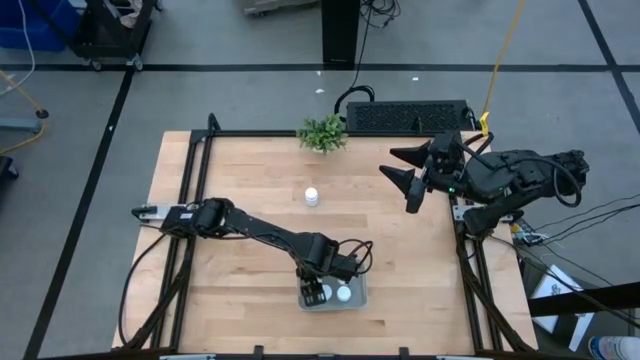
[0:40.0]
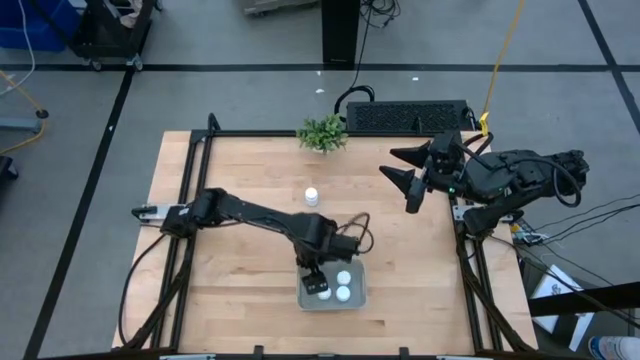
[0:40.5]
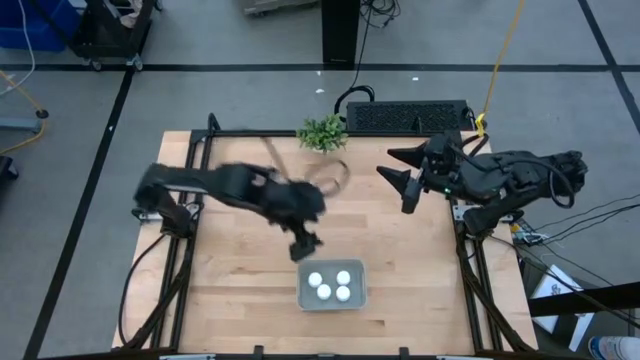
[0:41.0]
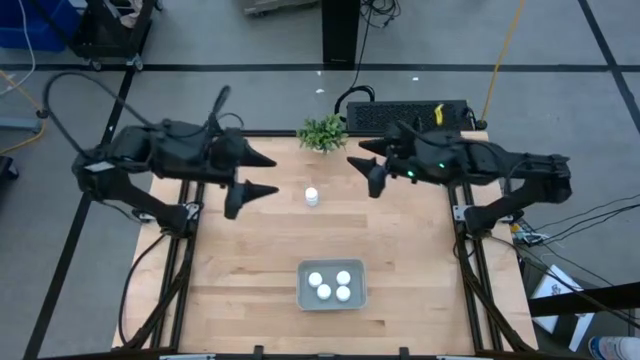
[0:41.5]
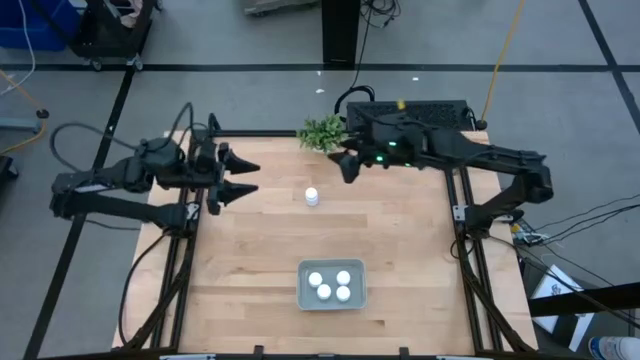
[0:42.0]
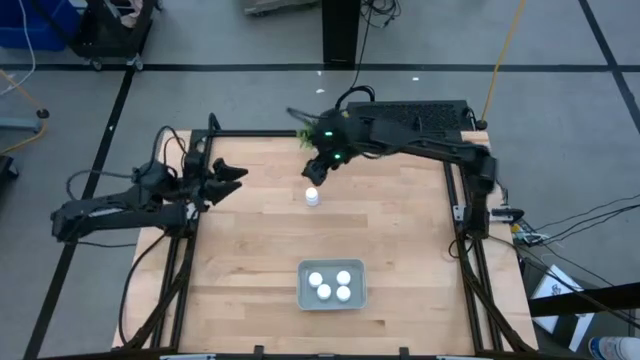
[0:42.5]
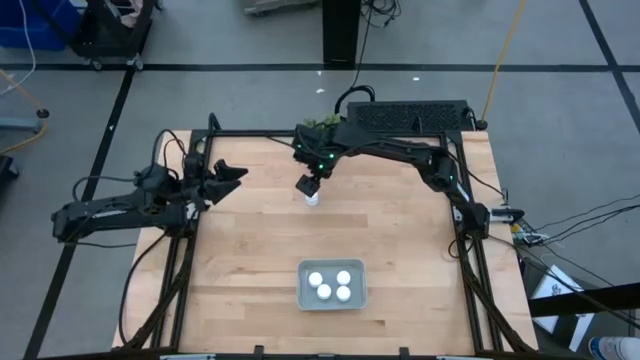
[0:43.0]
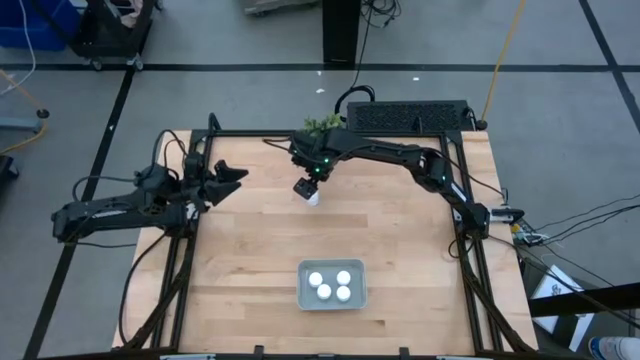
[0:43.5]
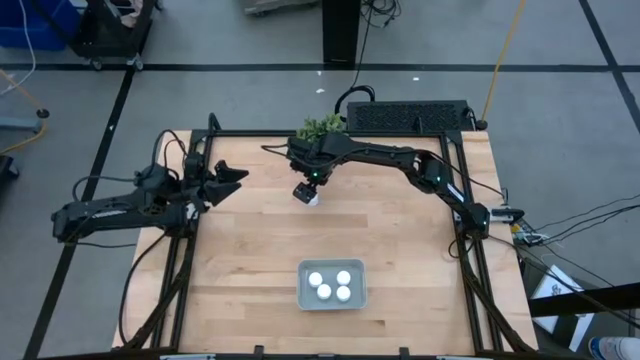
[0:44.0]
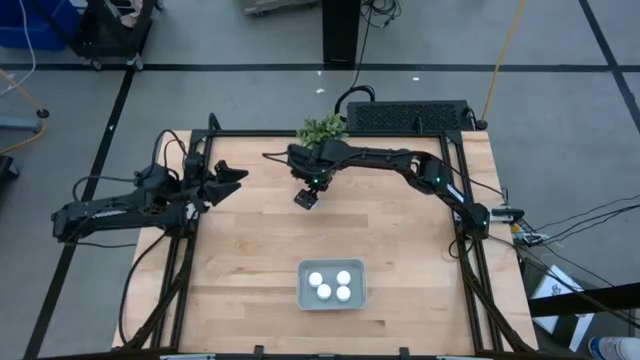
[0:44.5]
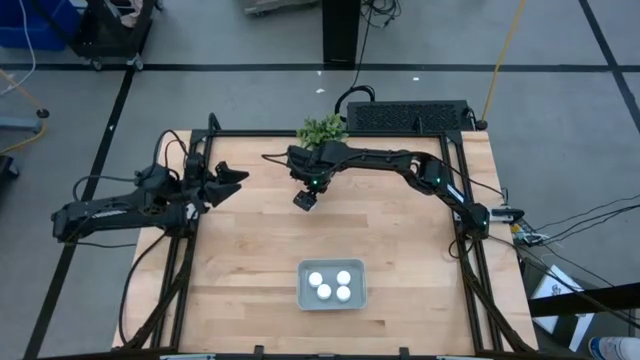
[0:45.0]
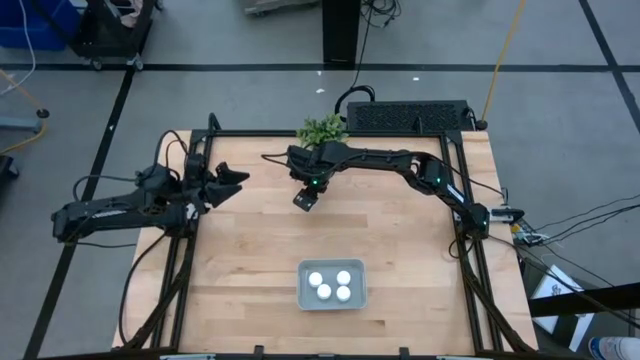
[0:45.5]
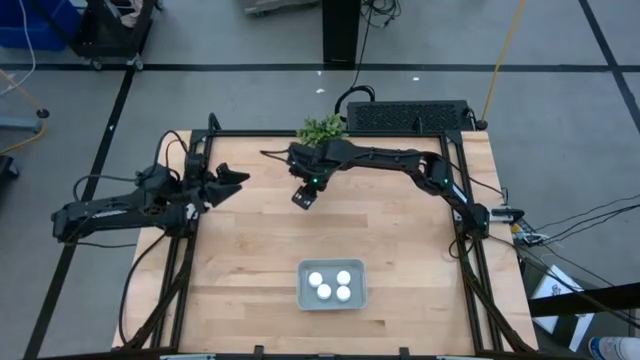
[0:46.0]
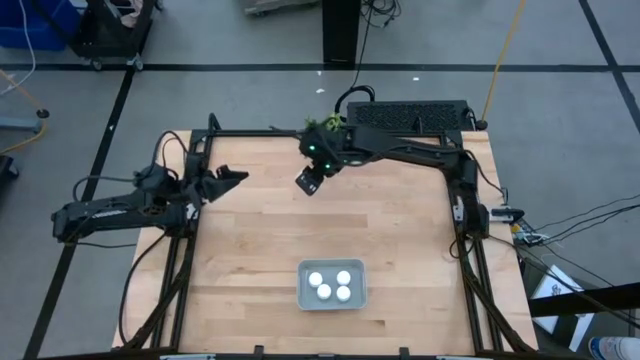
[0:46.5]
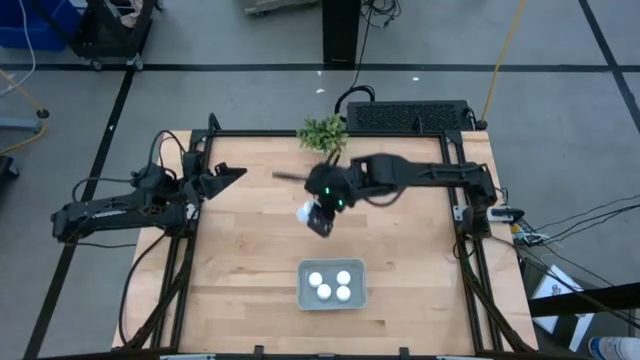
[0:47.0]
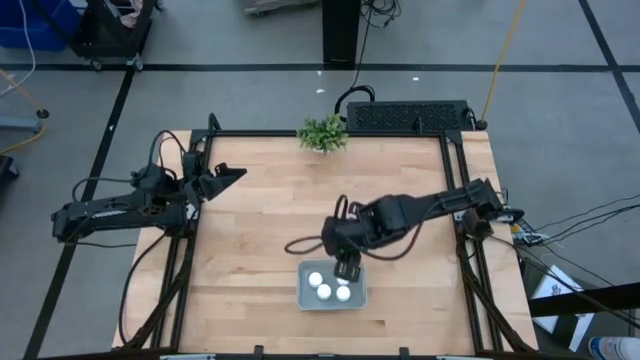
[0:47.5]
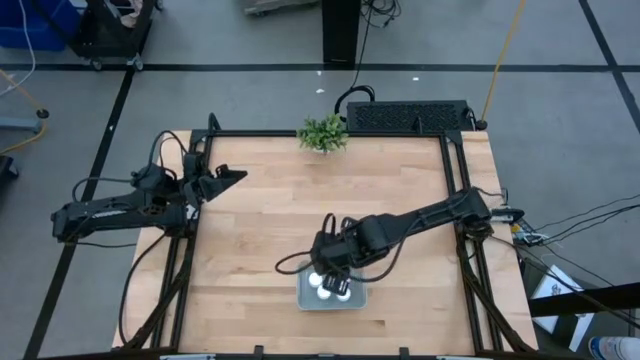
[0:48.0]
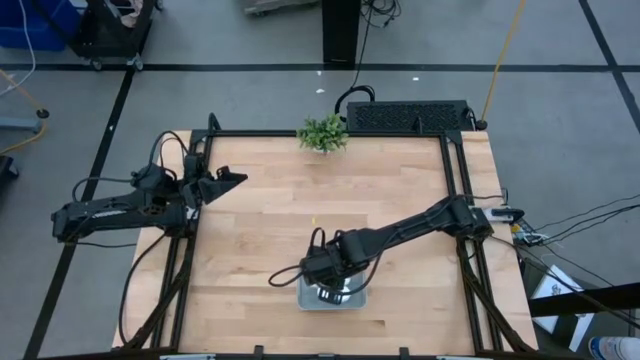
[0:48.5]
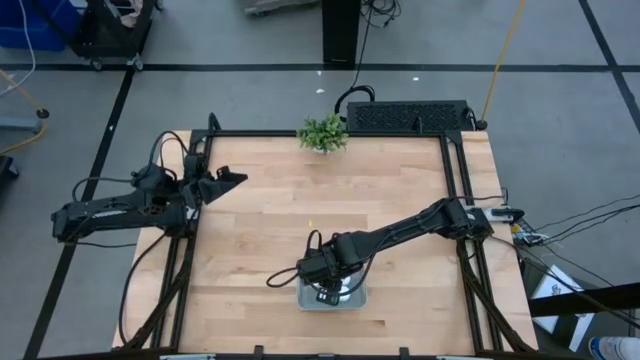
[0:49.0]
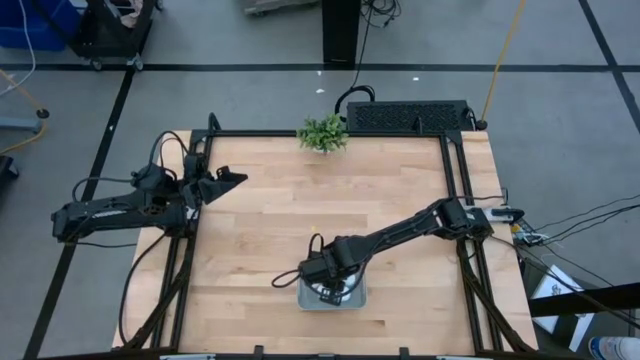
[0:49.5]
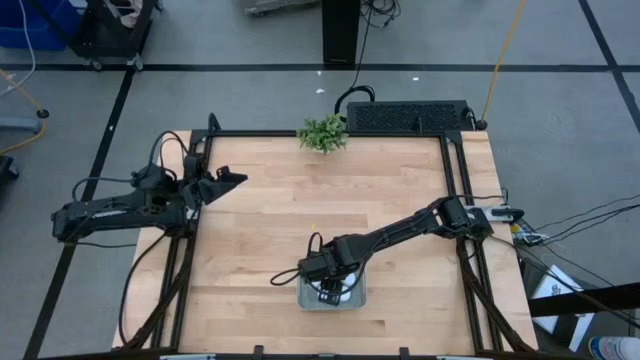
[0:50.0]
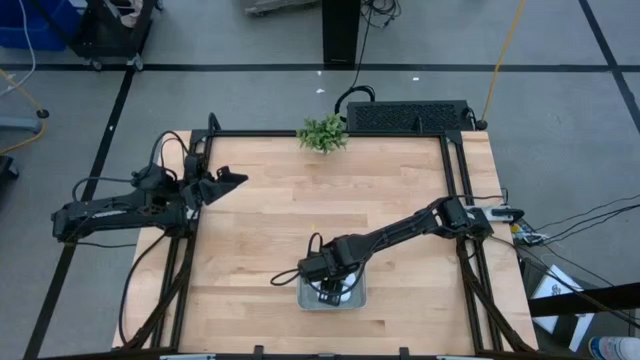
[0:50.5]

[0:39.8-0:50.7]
Task: Pick and place pill bottles into a basket
Put the white medicine bottle into the gray bin

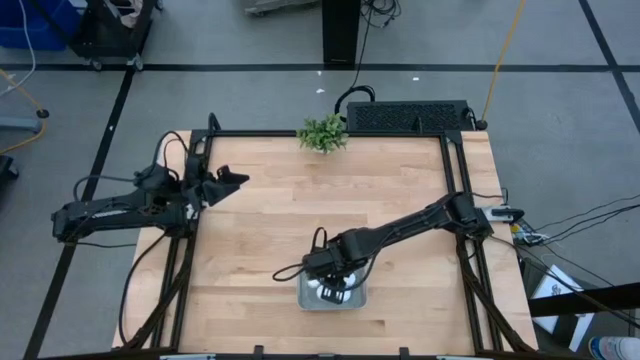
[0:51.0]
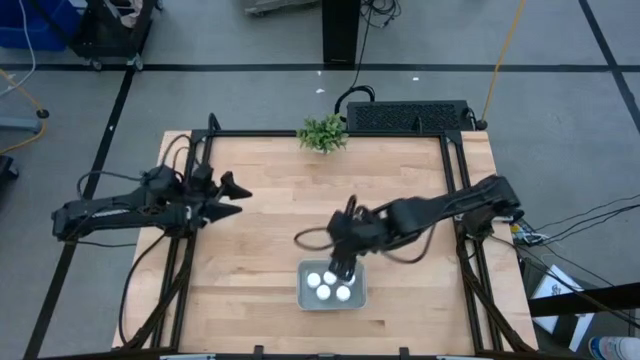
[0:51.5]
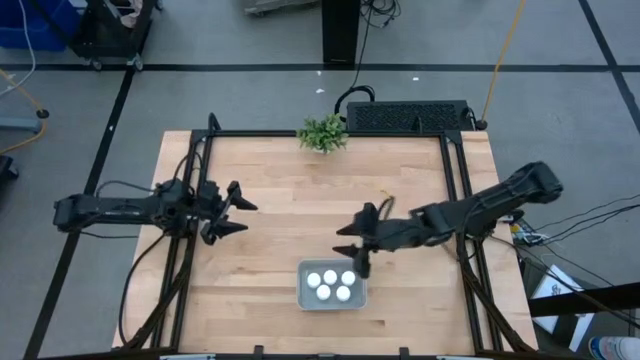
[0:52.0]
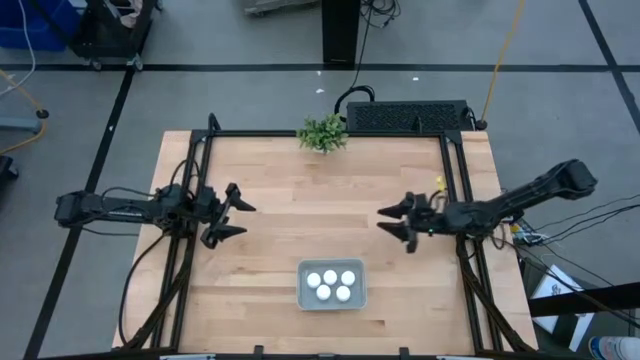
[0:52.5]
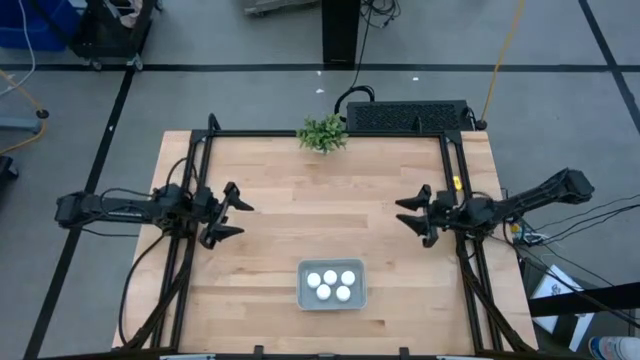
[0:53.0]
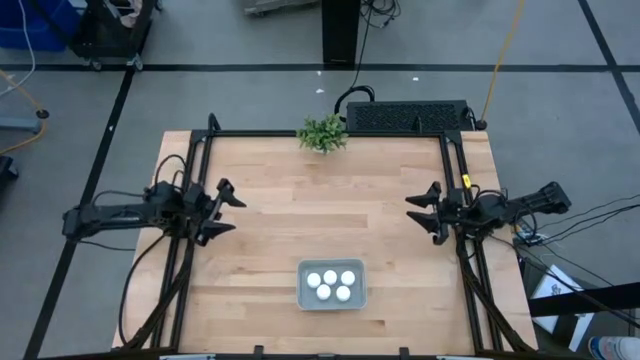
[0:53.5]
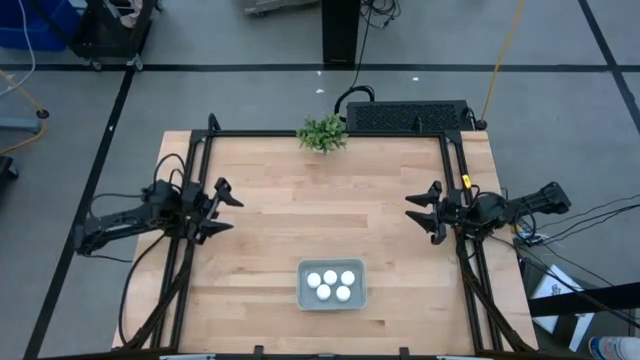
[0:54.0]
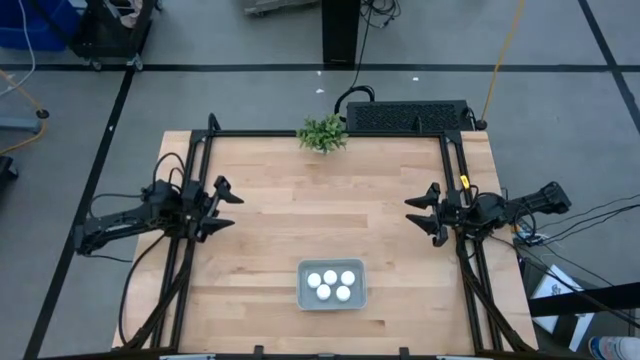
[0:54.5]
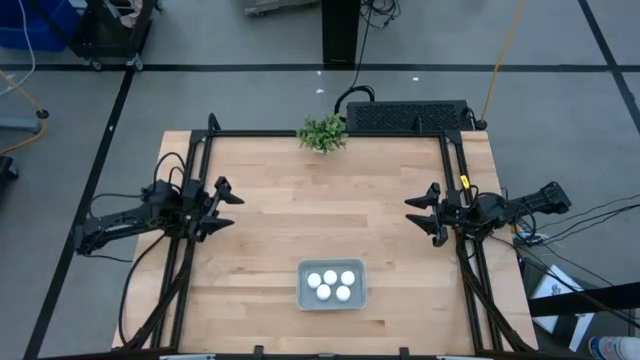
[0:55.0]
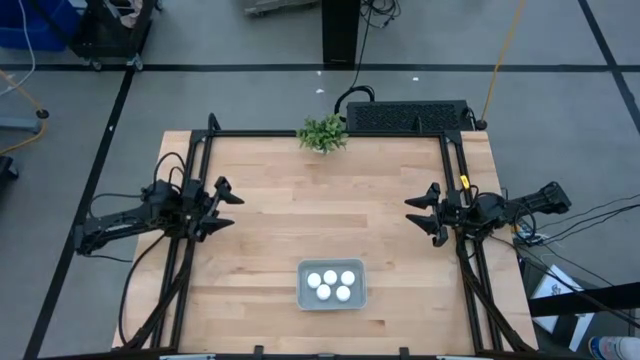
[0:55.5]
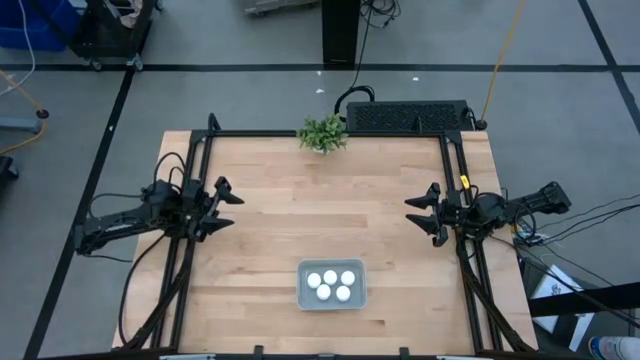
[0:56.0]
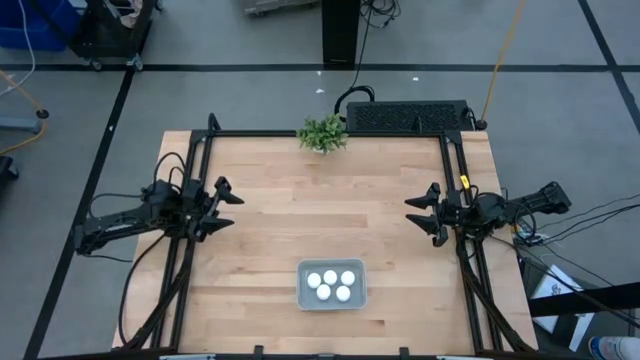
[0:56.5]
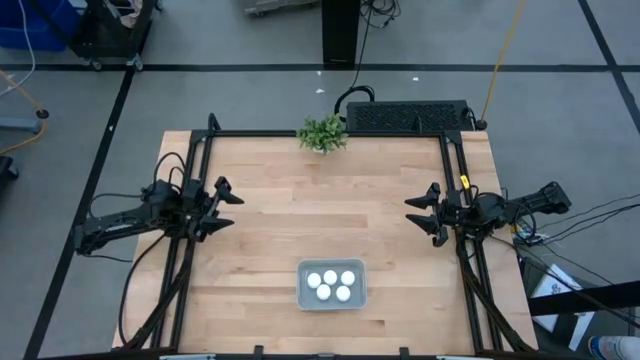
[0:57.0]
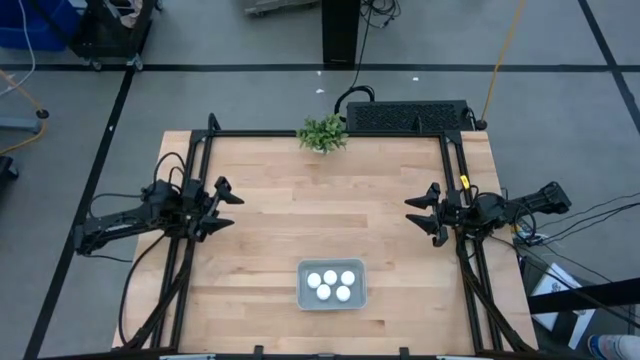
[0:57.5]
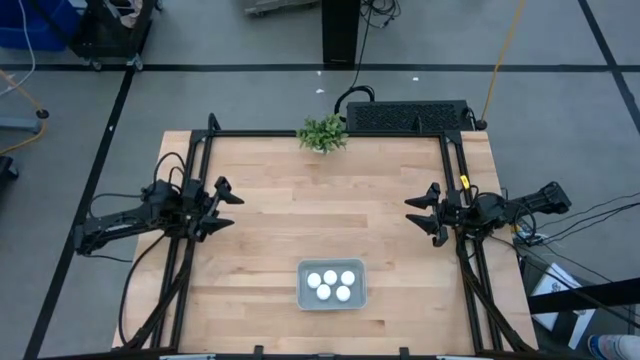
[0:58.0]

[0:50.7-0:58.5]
Return to Home Position

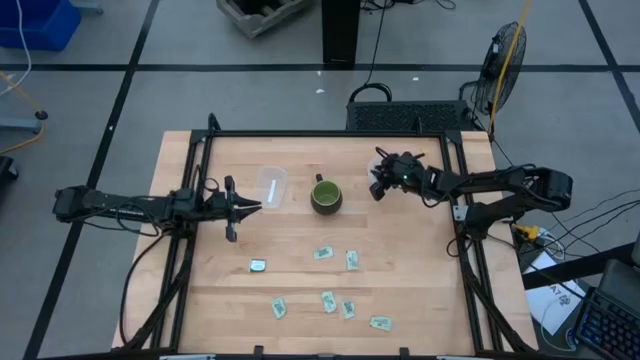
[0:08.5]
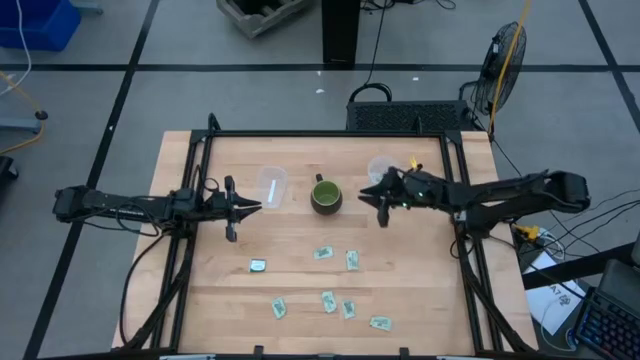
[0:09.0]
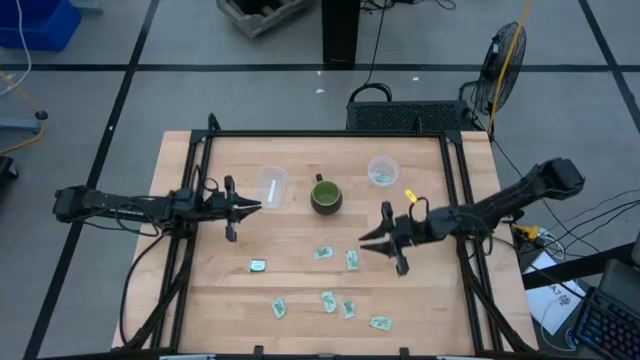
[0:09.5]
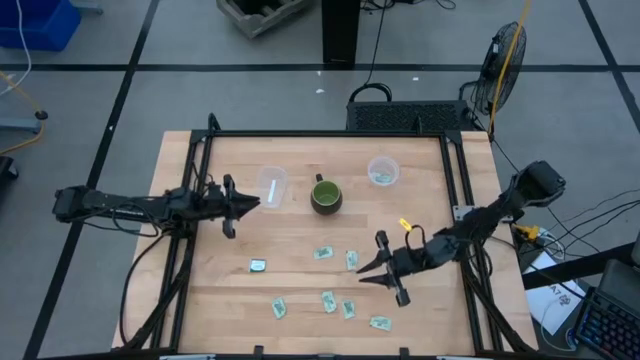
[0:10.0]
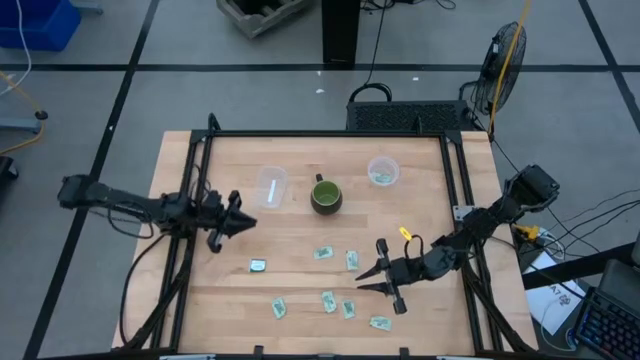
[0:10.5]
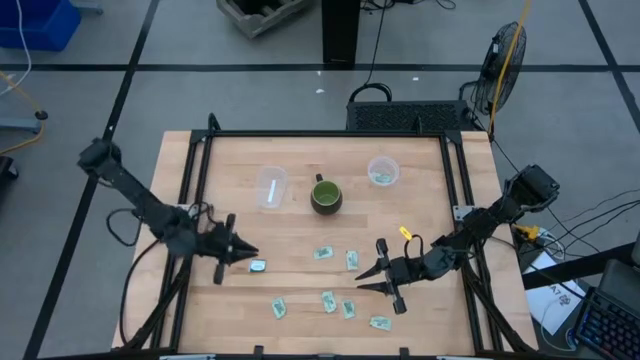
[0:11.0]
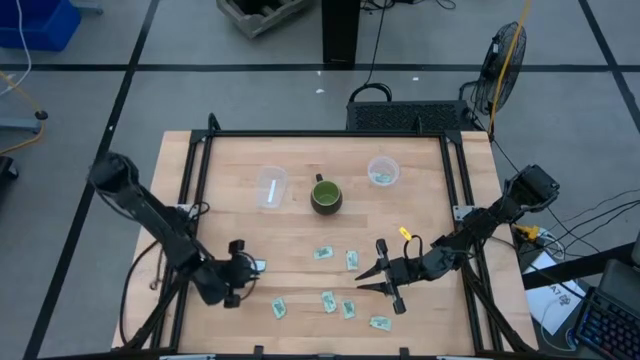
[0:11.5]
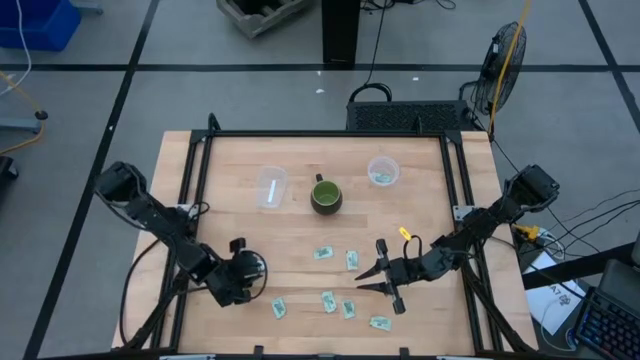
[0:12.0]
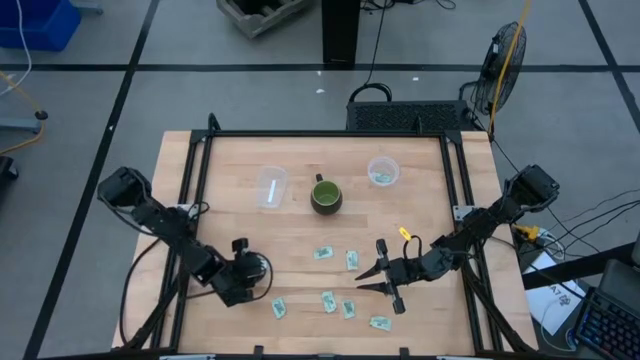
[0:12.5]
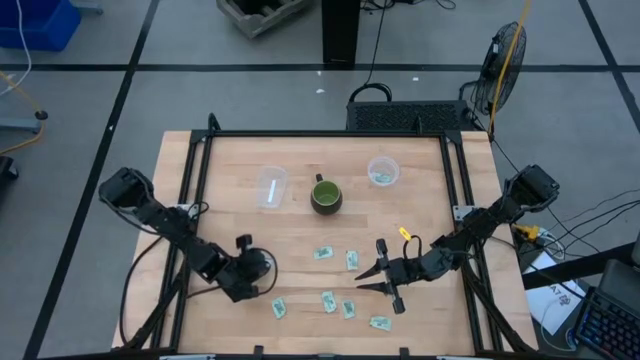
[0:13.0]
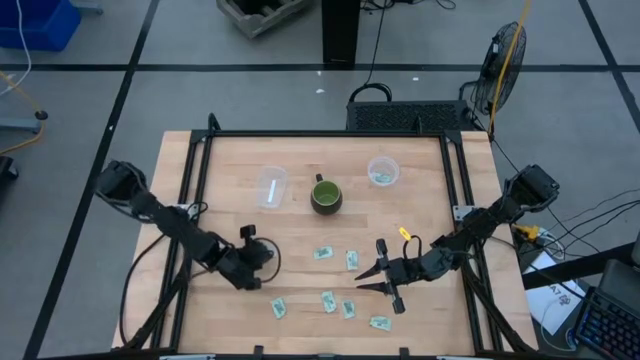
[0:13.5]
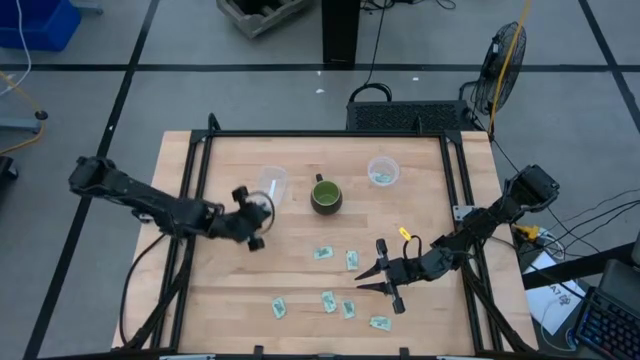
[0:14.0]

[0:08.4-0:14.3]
Task: Pick and place items into bin
Put the dark green stevia packet into the left transparent bin
